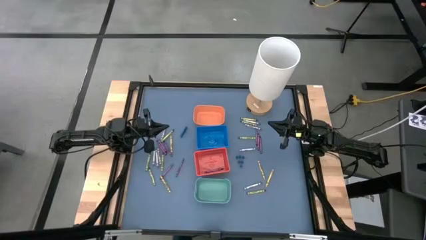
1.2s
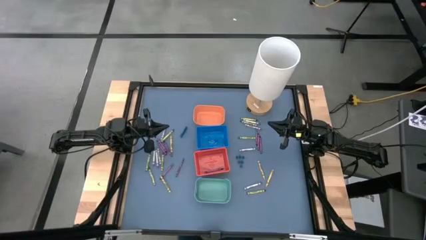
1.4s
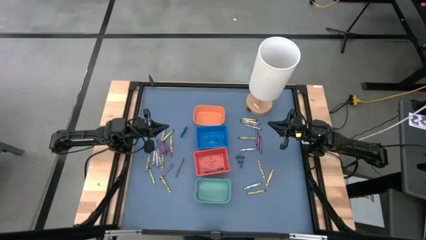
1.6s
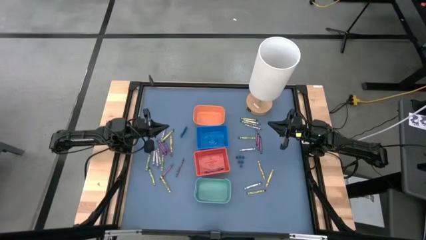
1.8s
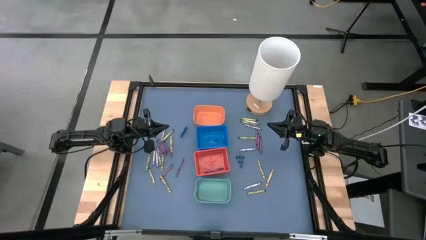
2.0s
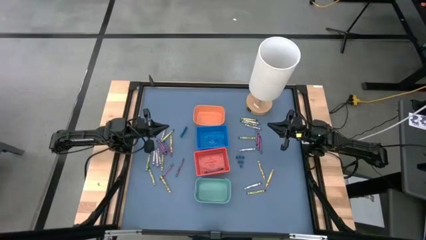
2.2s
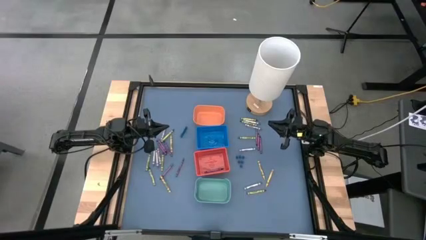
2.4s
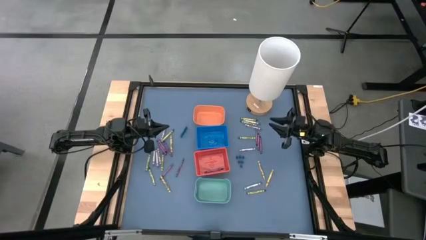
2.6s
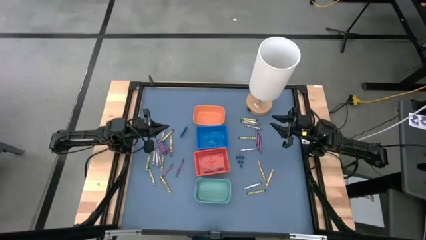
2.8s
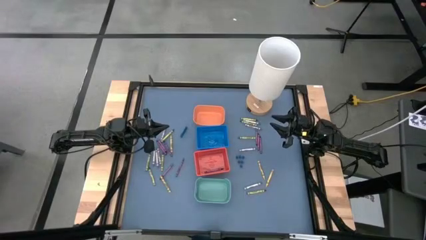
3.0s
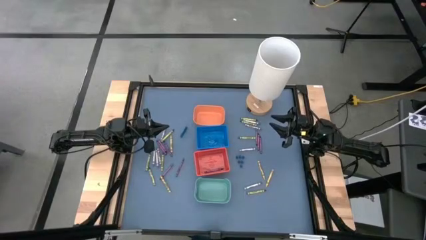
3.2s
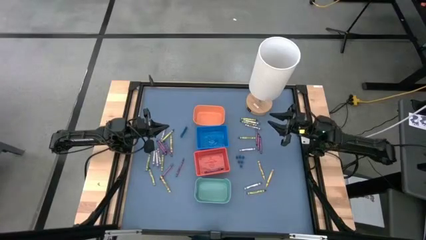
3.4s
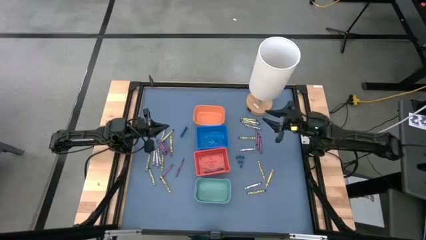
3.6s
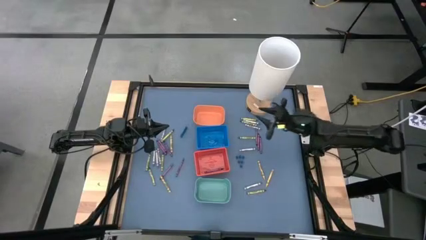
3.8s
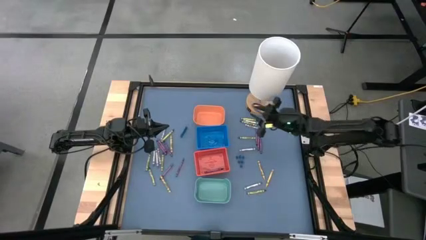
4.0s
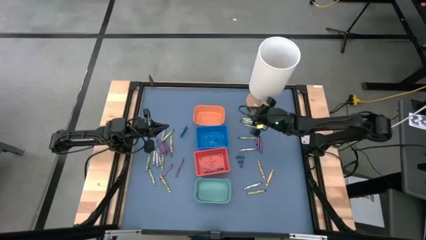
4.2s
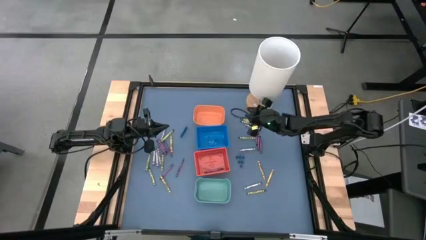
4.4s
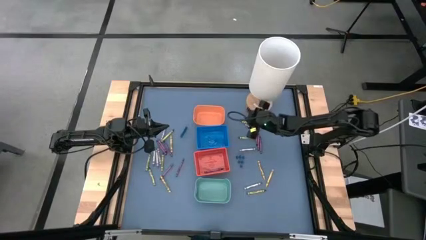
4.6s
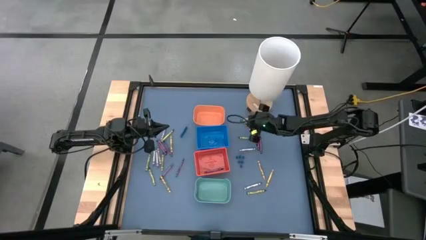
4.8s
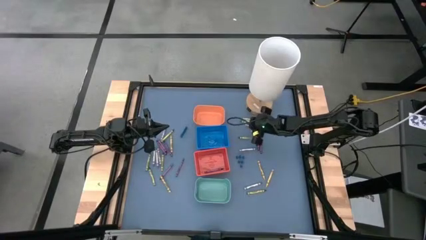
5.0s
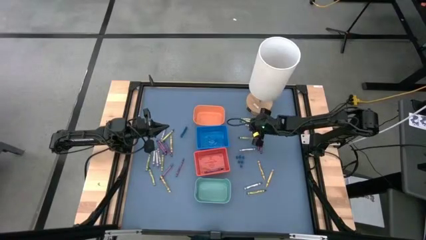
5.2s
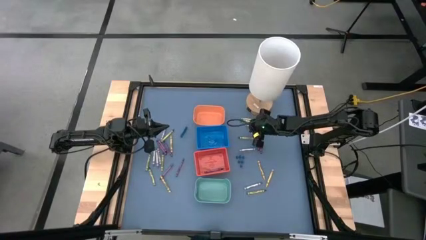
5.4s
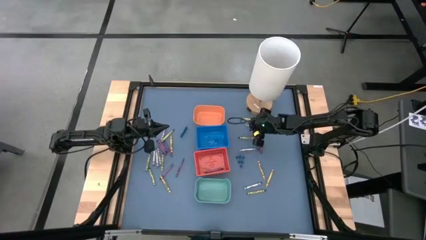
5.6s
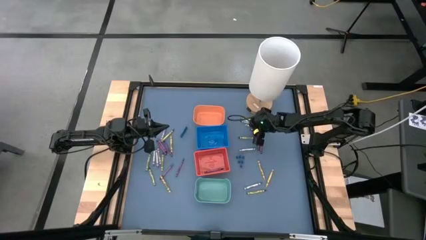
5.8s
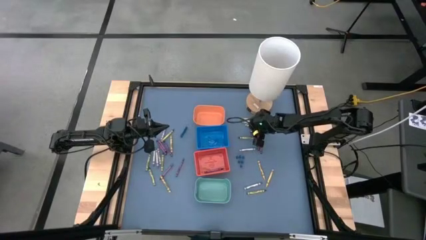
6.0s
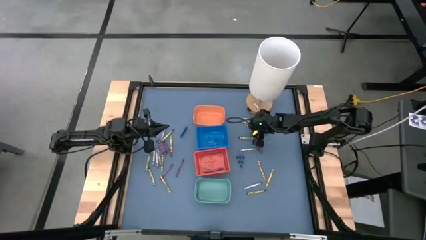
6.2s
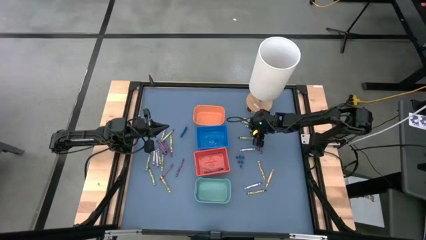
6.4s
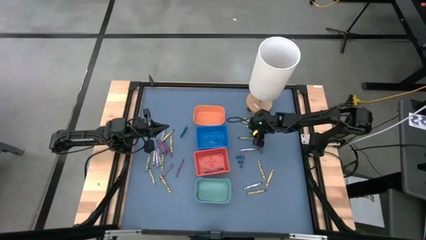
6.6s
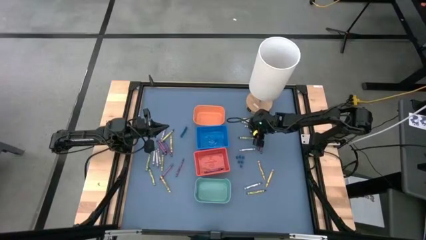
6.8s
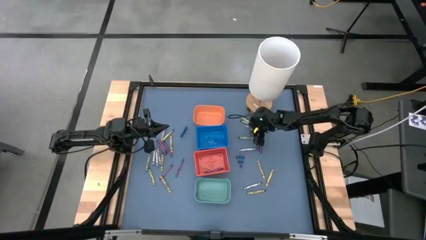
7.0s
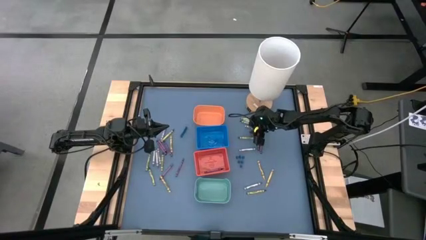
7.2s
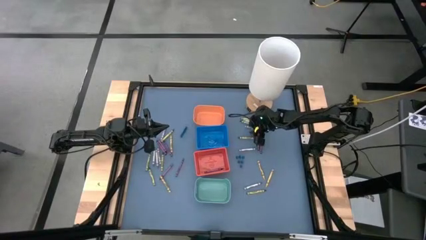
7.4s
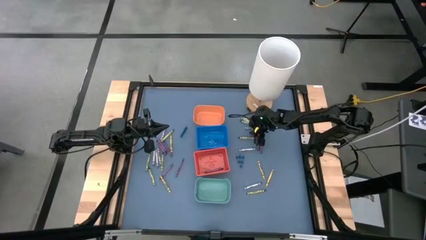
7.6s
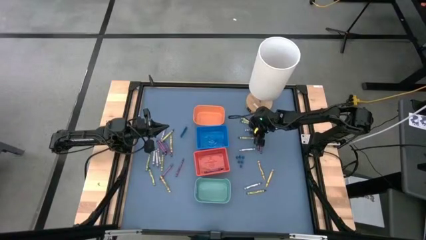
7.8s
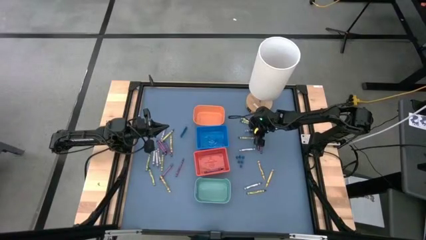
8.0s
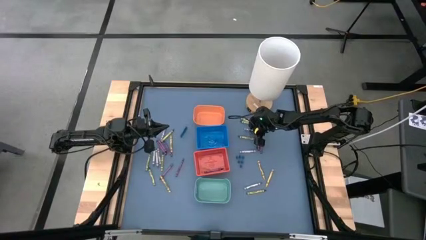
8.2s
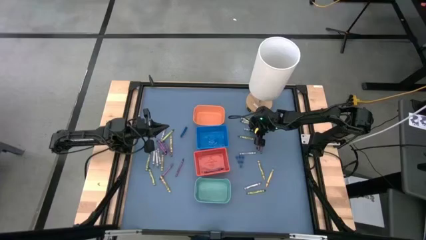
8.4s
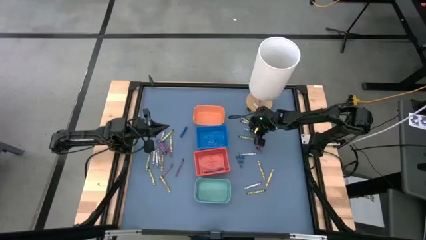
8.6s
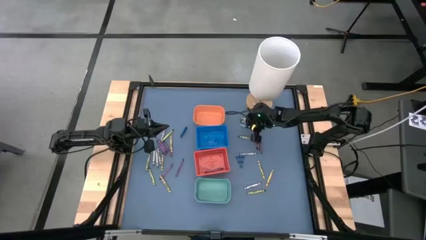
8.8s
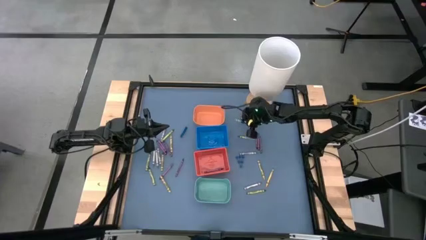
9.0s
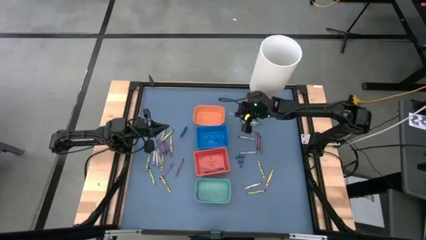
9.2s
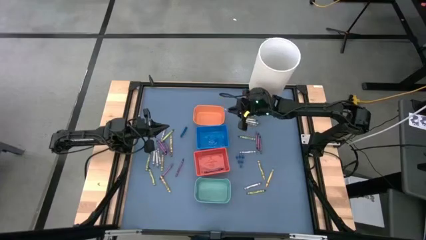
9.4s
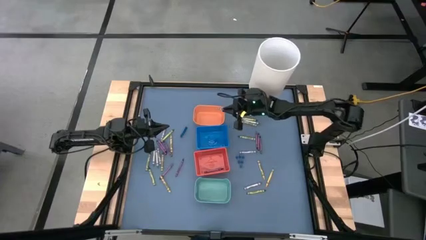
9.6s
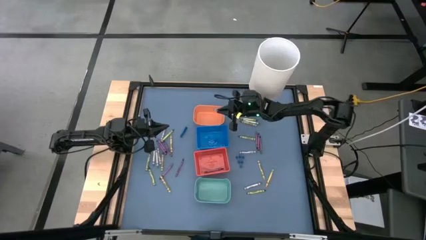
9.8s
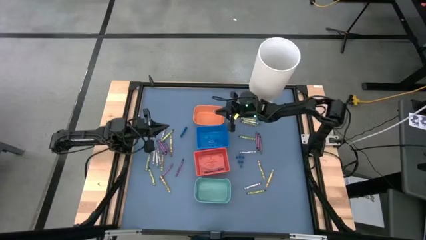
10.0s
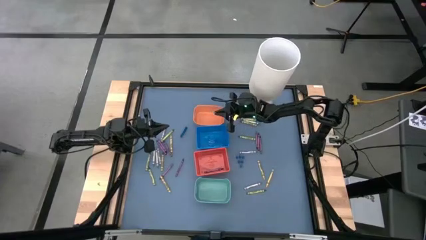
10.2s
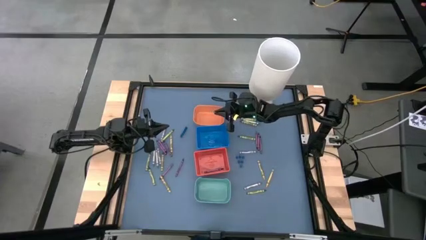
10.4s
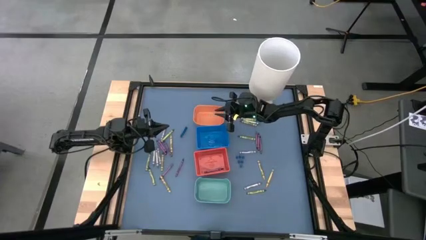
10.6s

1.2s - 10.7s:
Task: Sort crayons
Put the gray crayon into the orange bin

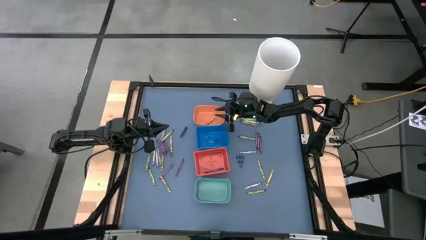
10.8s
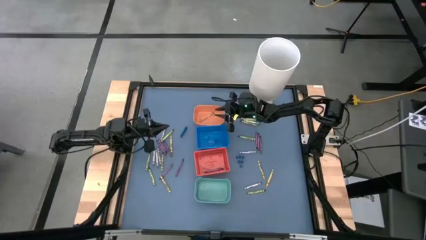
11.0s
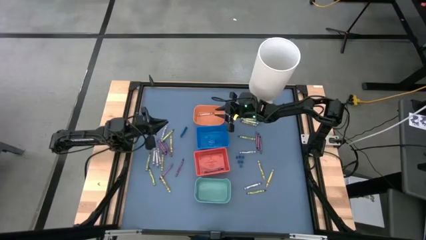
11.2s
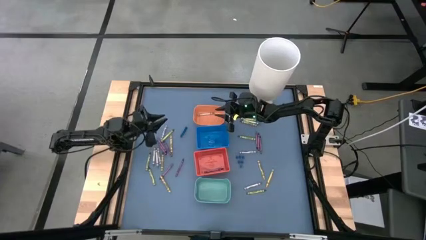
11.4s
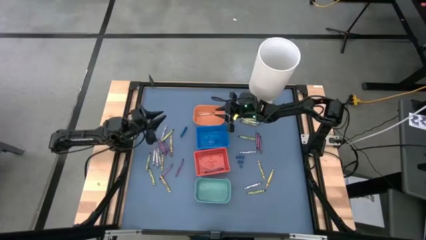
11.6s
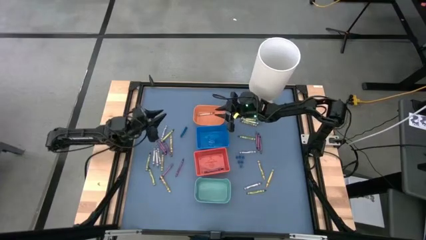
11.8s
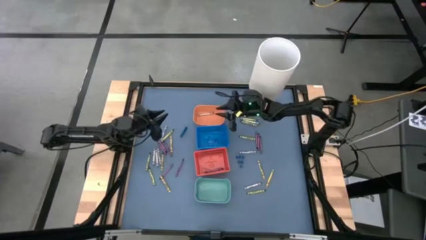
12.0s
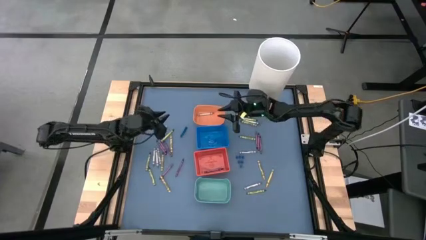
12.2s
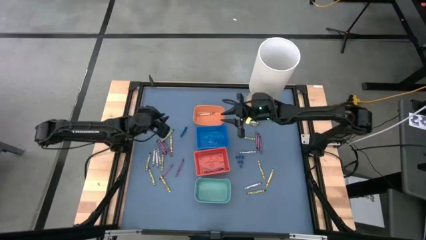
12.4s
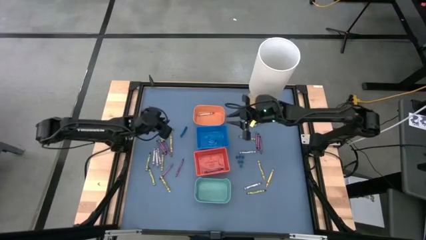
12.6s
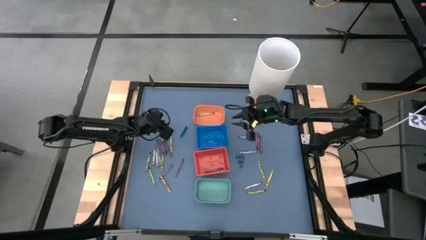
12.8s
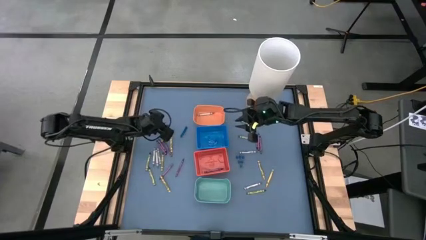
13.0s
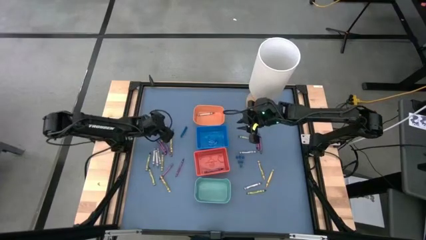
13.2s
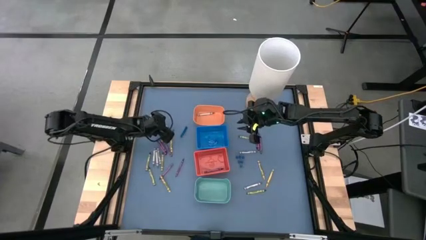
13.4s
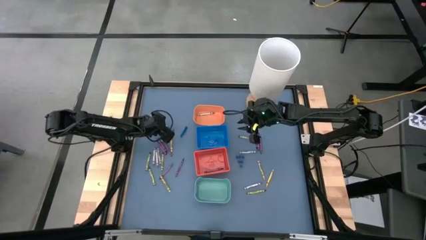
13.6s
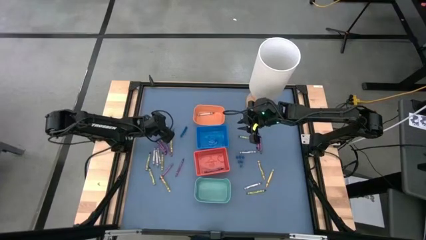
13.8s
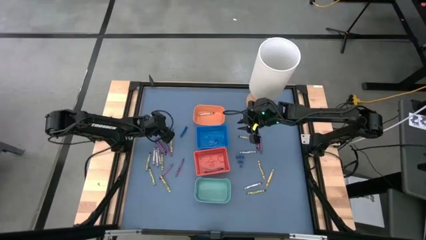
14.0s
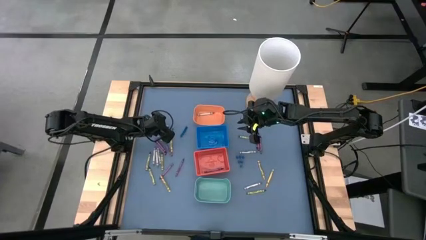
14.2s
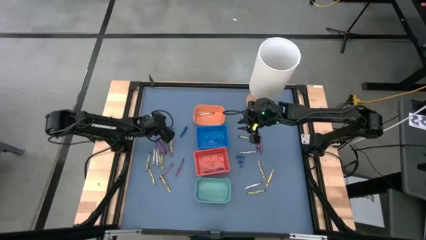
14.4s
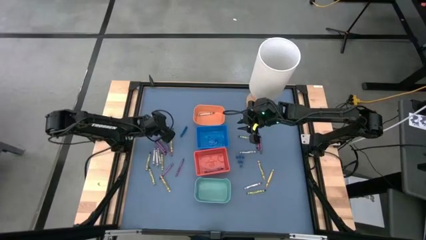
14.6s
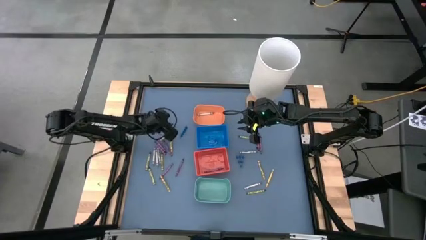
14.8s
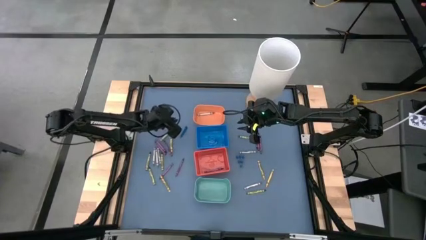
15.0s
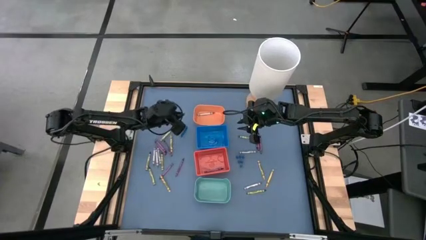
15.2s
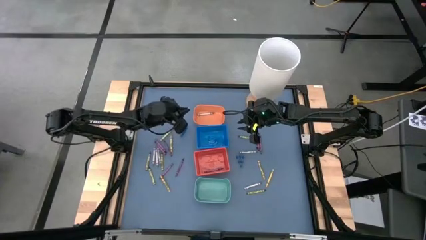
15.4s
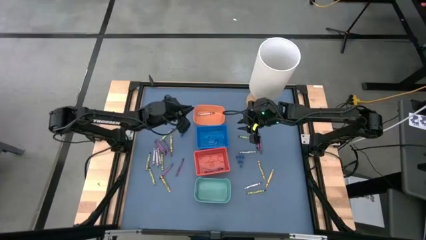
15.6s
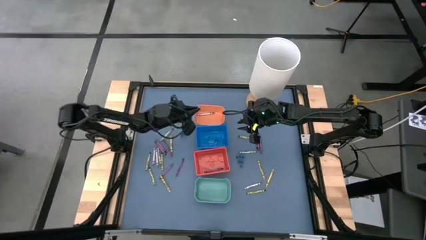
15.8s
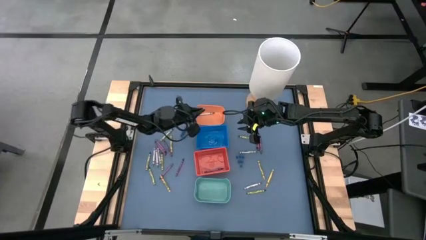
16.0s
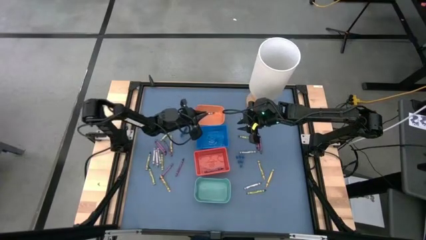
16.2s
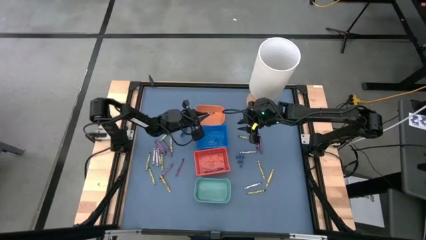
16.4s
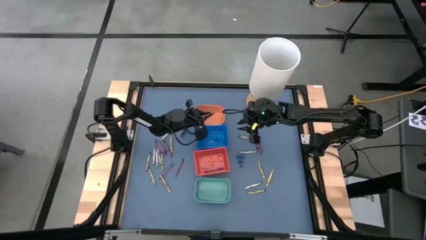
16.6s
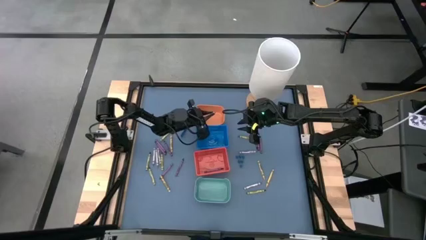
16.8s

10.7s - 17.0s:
Put the gray crayon into the orange bin

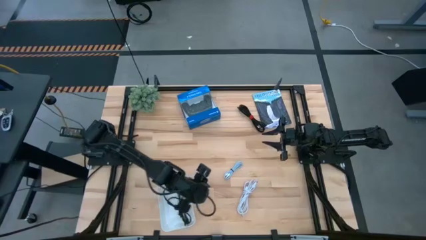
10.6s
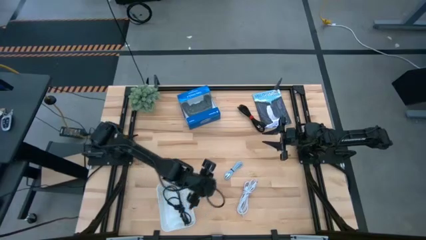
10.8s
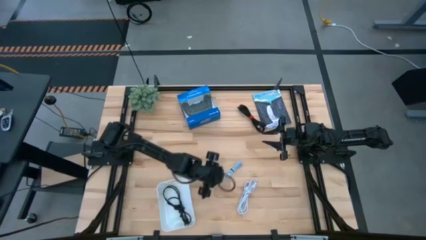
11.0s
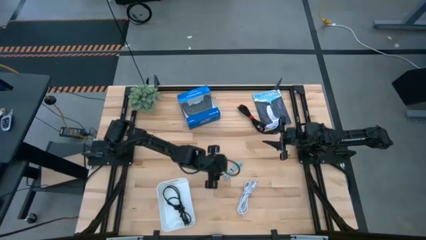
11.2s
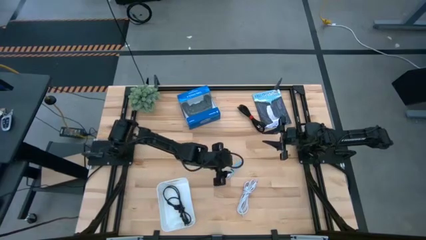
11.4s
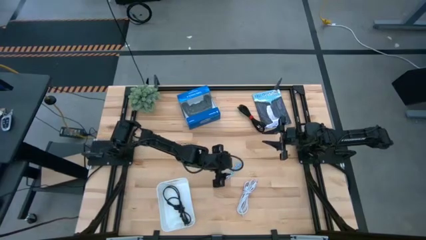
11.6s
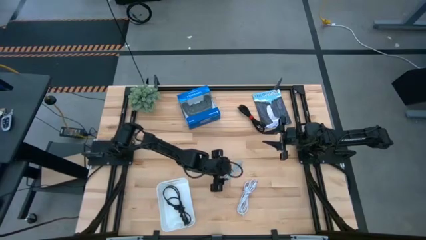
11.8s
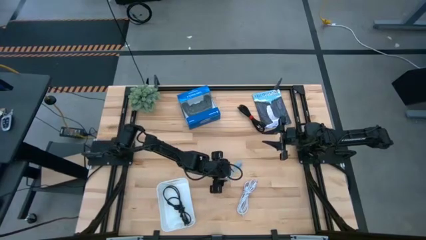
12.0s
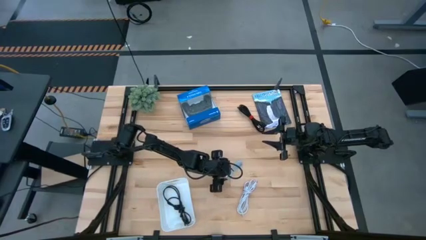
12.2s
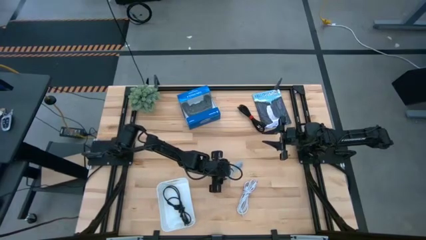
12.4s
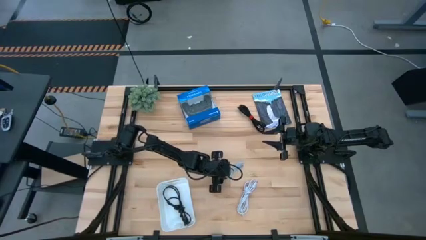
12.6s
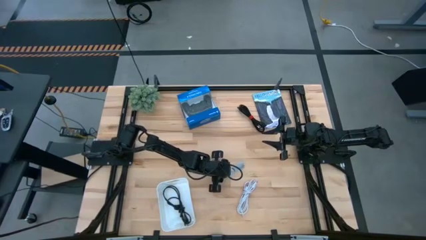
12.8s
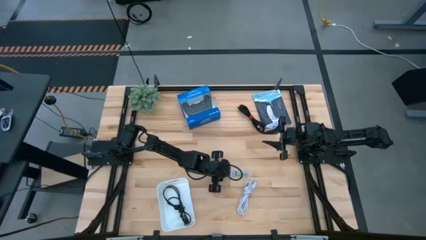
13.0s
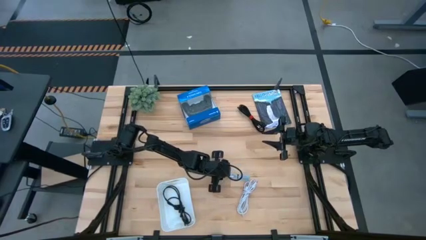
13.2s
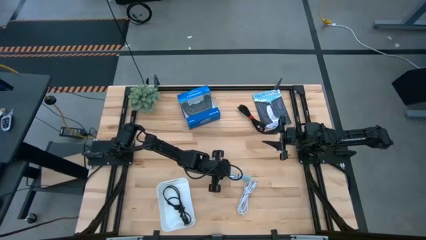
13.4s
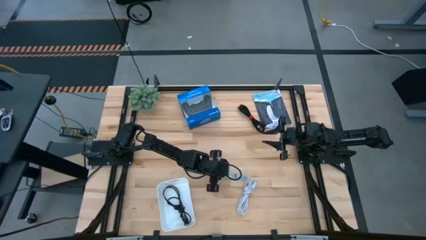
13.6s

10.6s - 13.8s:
Task: Pick and place USB-C Cables
Put the light blue charger cable into the white bin
